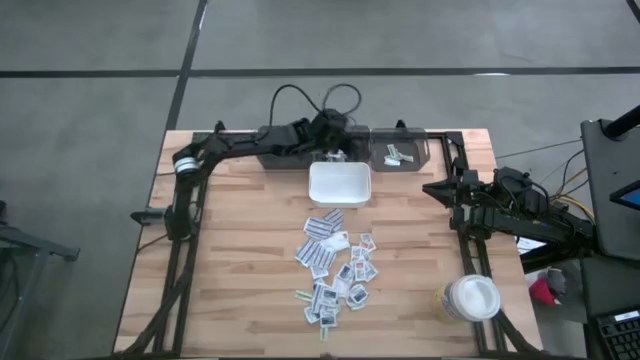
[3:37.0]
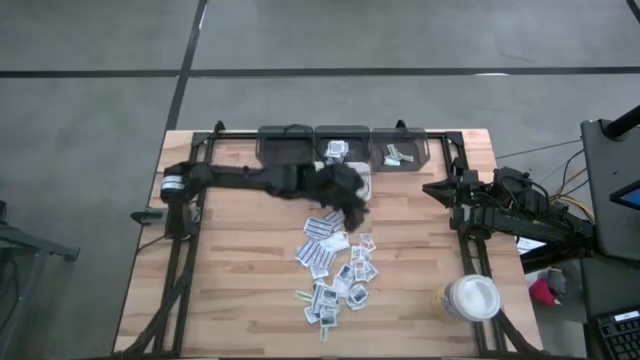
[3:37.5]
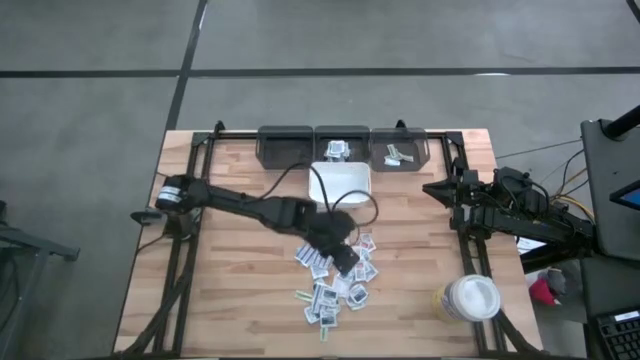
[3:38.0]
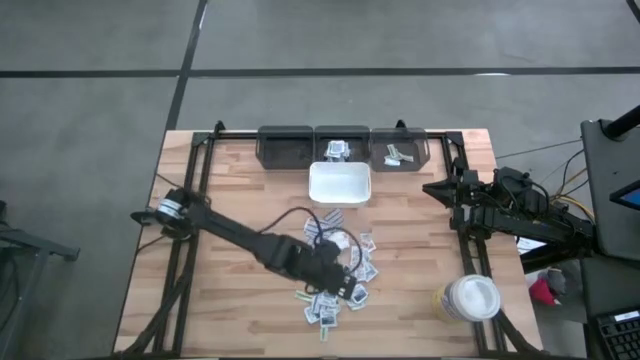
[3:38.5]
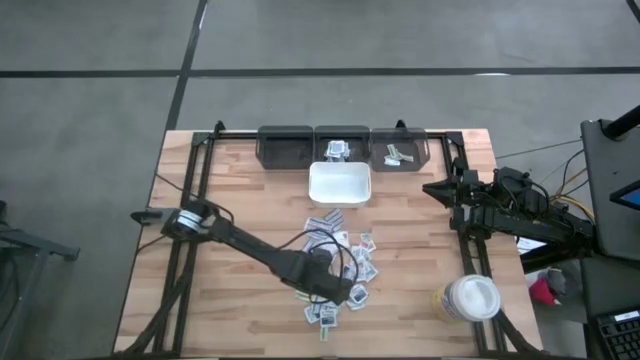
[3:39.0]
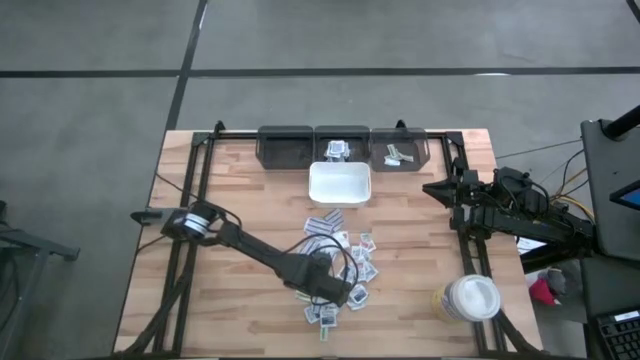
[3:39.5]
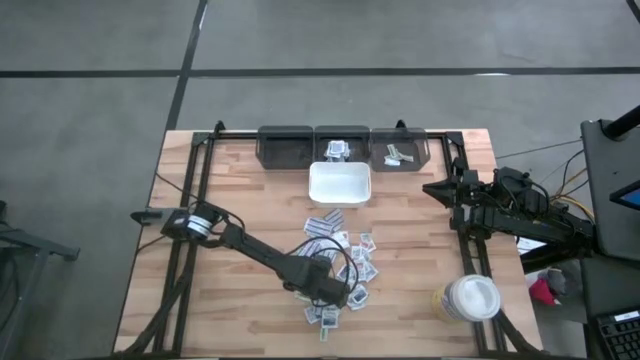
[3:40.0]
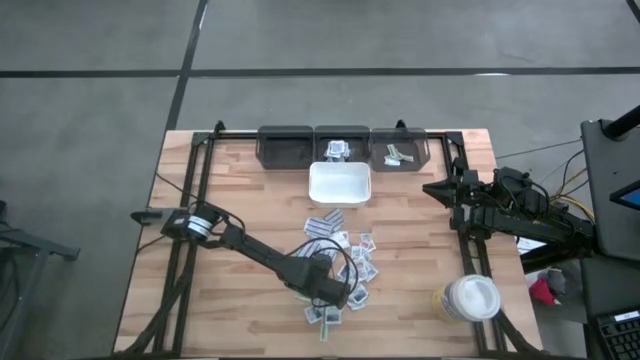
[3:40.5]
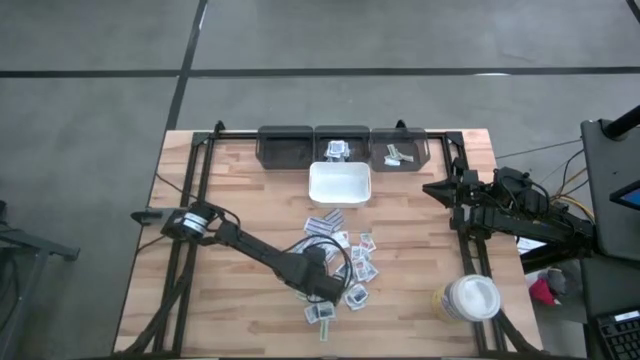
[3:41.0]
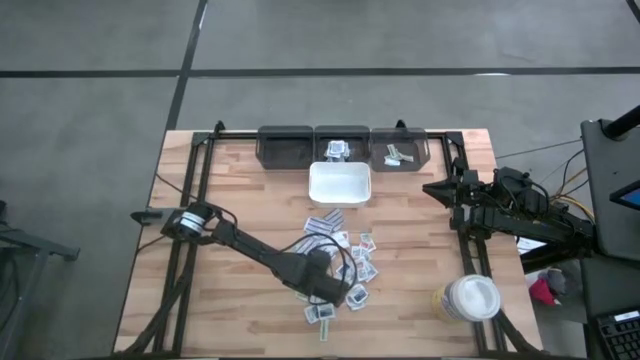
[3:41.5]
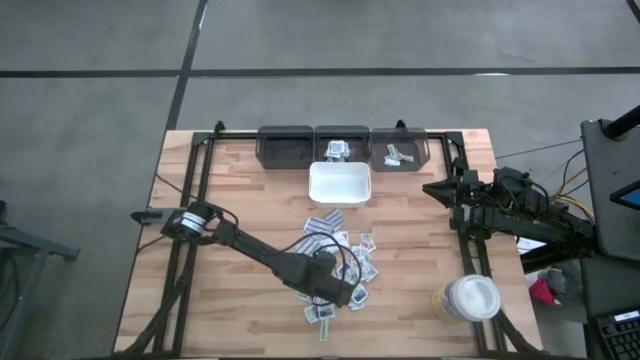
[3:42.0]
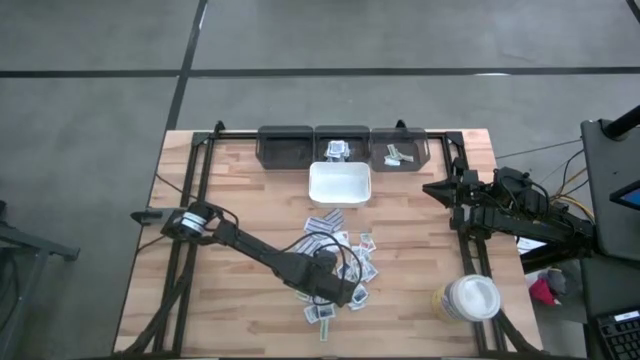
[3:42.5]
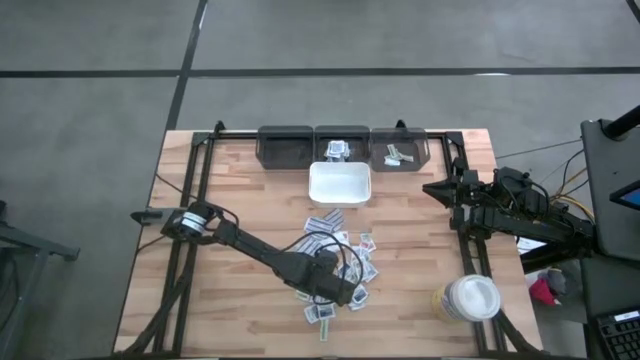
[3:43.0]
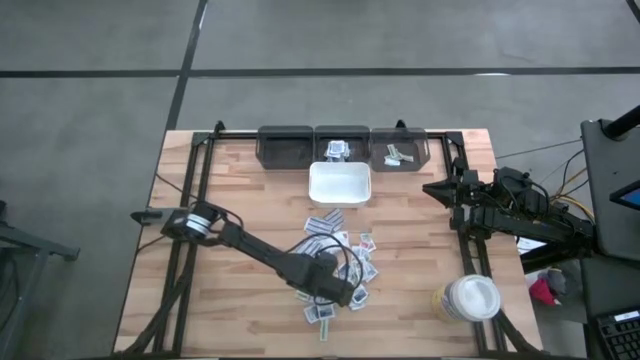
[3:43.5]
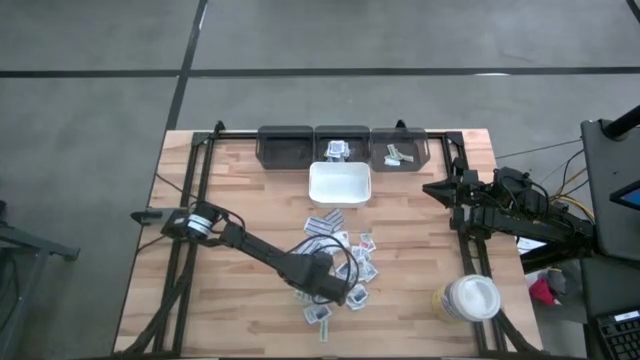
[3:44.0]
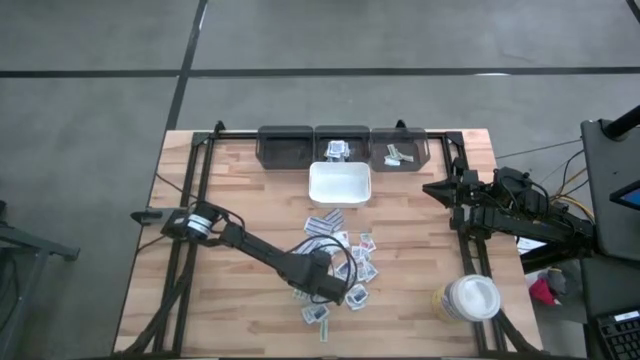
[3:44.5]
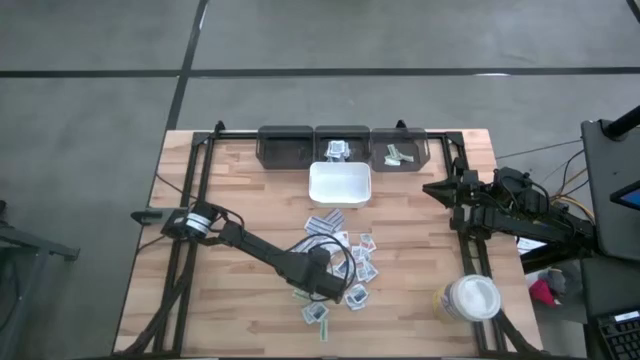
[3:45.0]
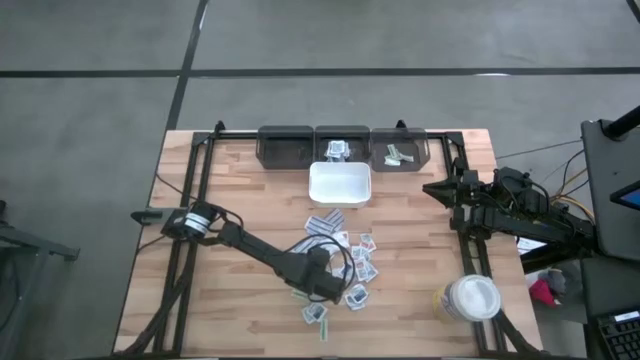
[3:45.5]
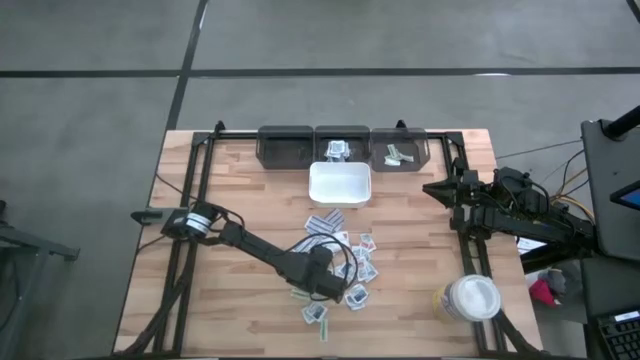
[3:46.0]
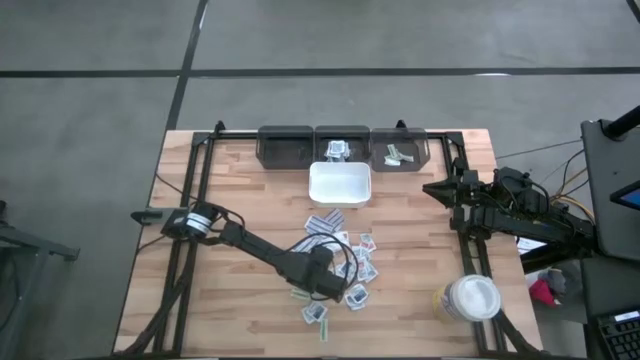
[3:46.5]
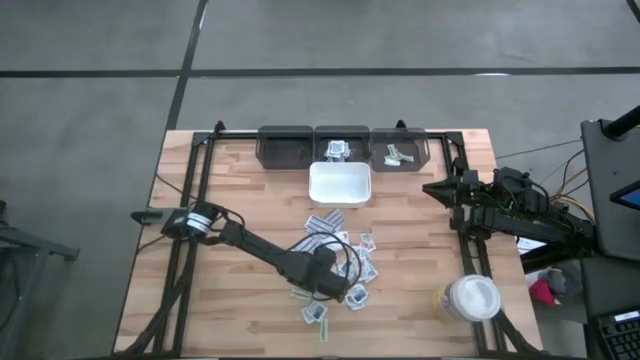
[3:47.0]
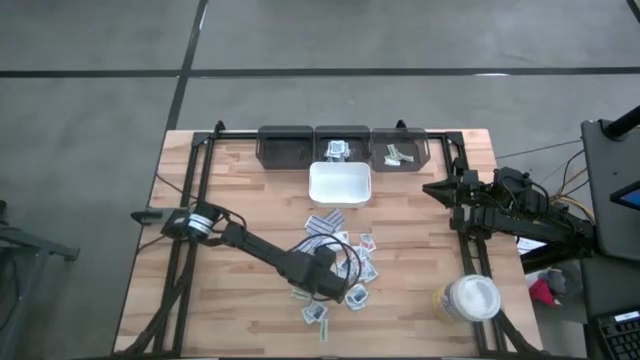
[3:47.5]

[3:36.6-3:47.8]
Task: Pick & Place First Aid Supplies
Put the blue alcohol pad into the middle gray bin

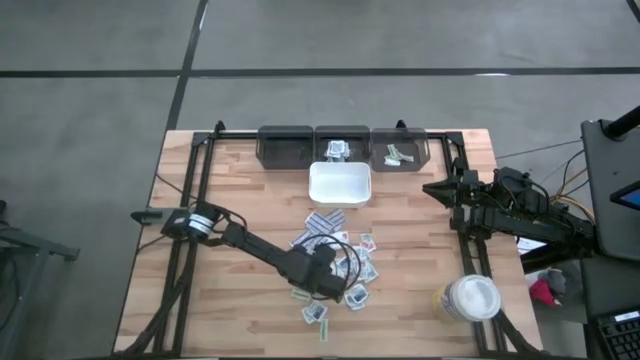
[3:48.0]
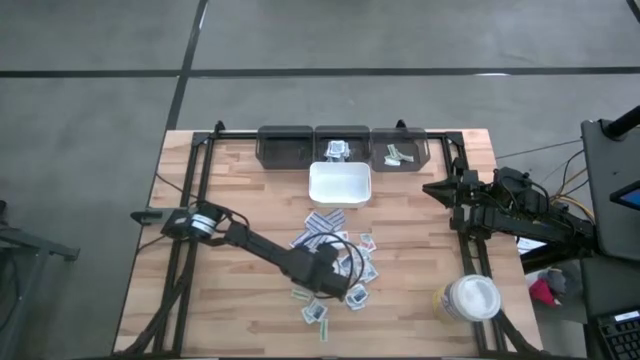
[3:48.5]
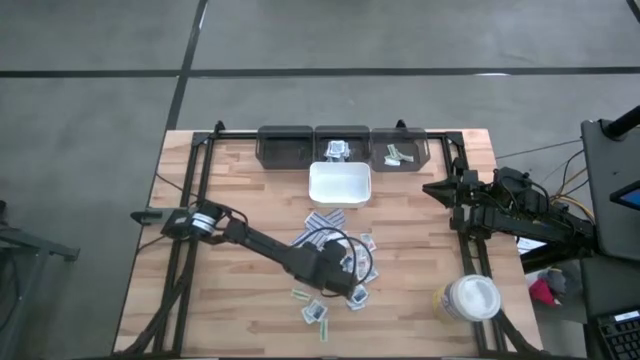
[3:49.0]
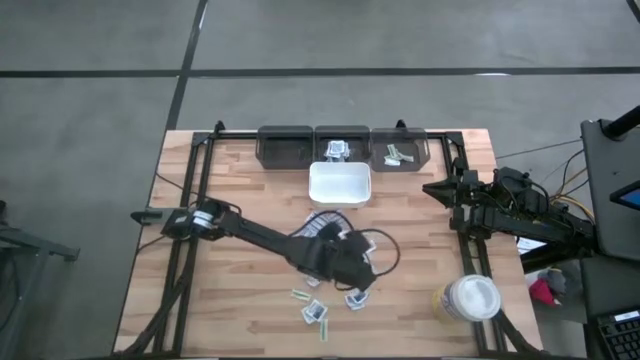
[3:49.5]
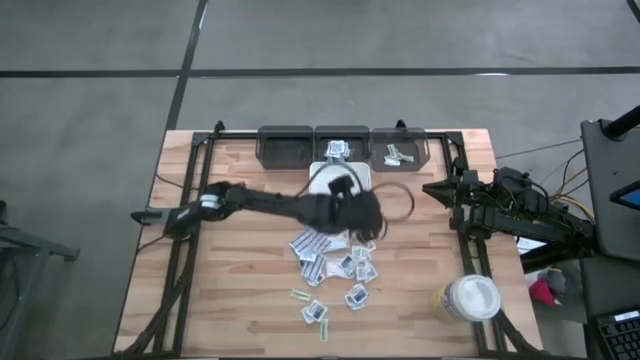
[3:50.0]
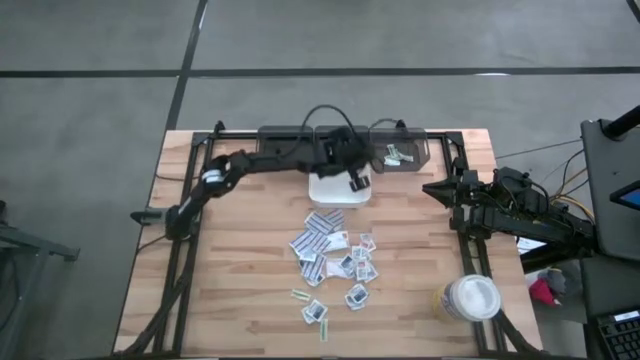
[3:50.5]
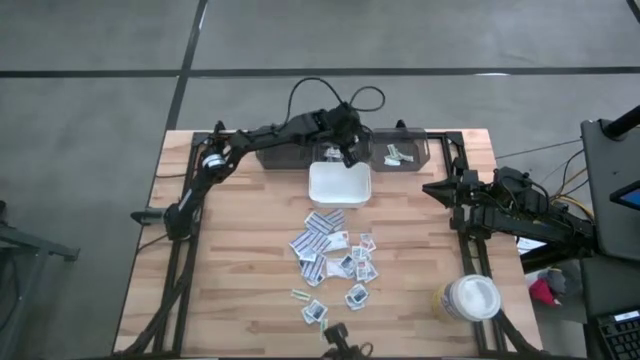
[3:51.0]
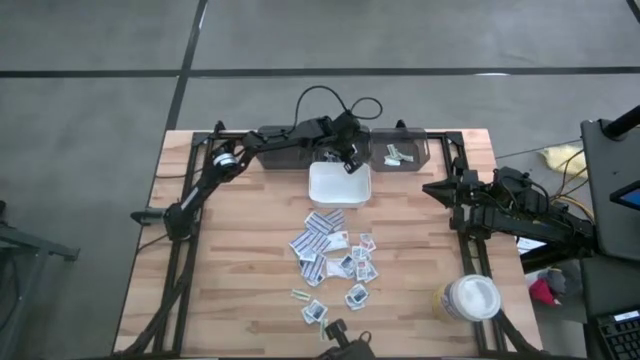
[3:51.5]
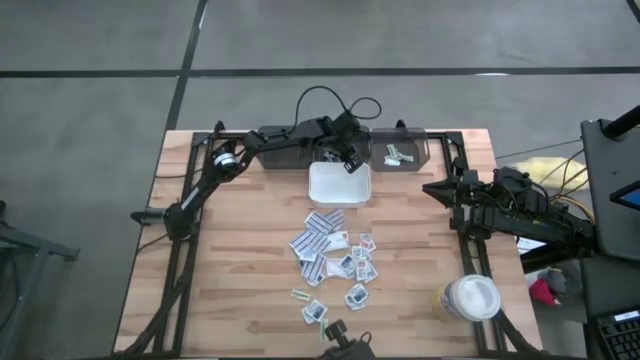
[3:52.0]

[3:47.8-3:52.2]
Put the blue alcohol pad into the middle gray bin

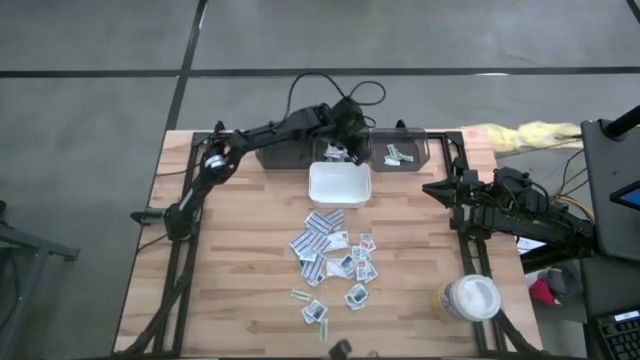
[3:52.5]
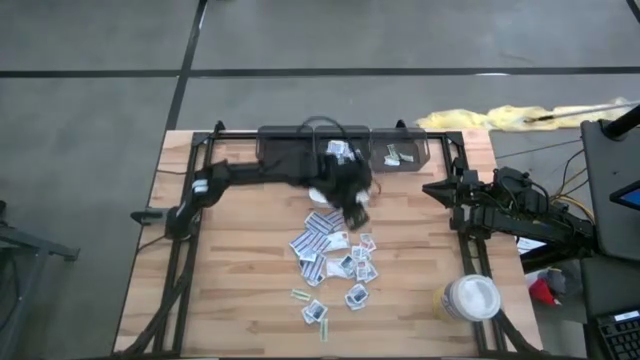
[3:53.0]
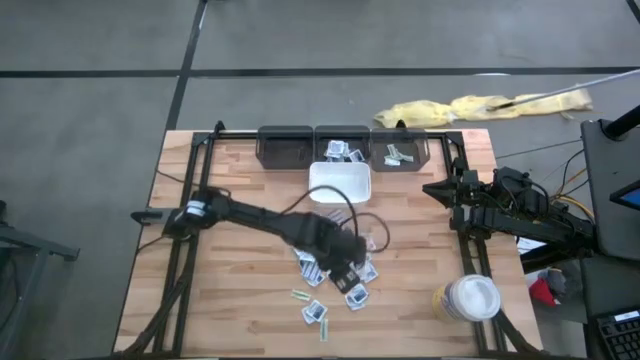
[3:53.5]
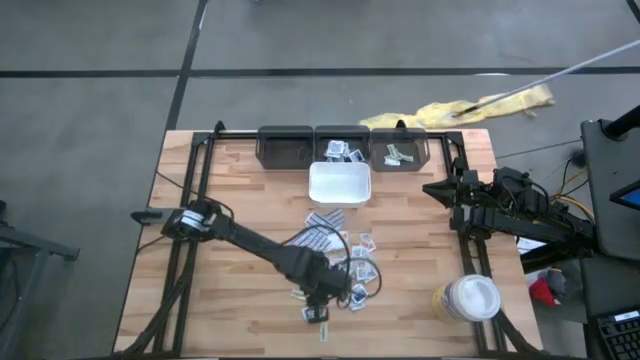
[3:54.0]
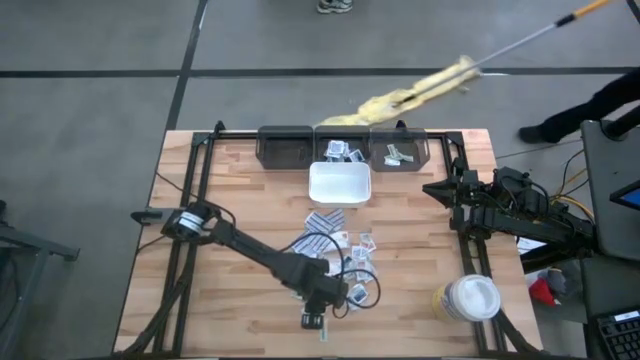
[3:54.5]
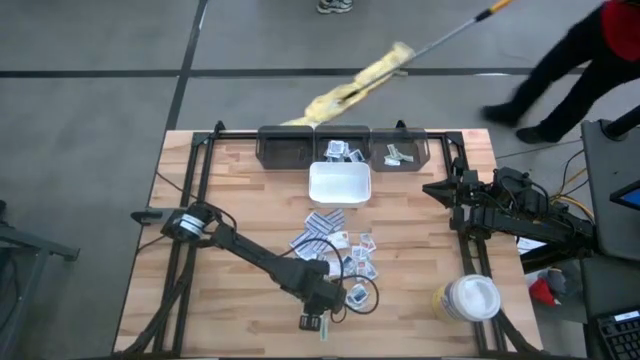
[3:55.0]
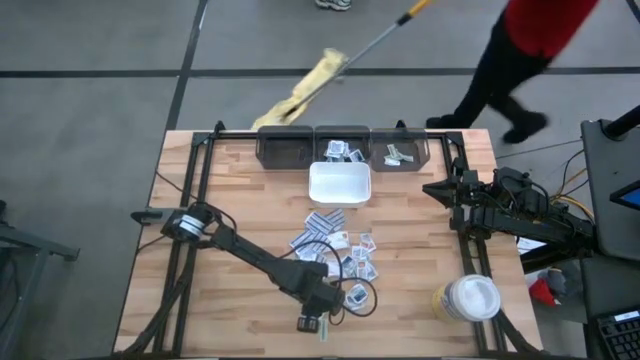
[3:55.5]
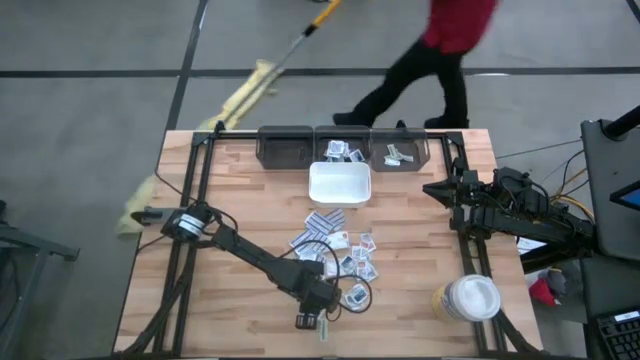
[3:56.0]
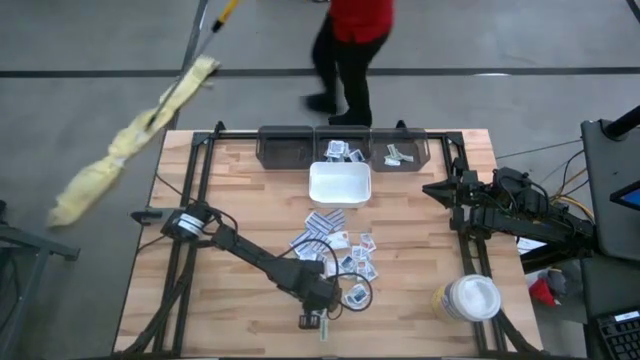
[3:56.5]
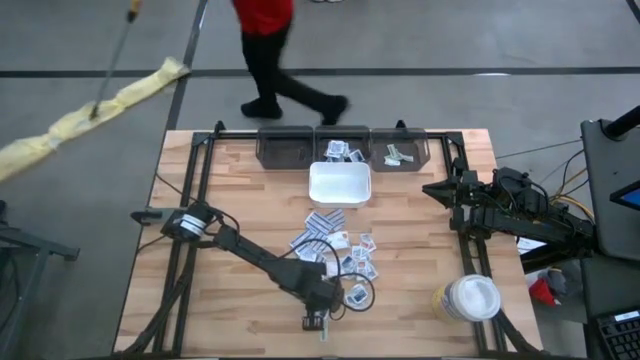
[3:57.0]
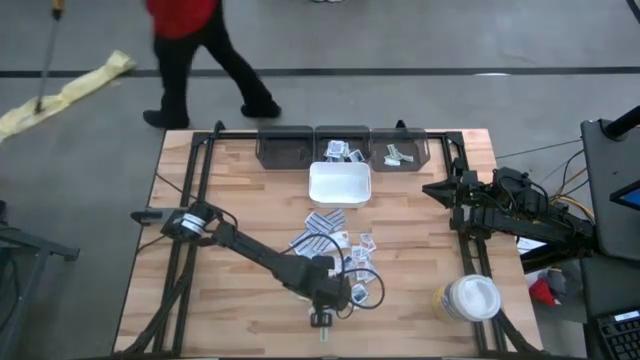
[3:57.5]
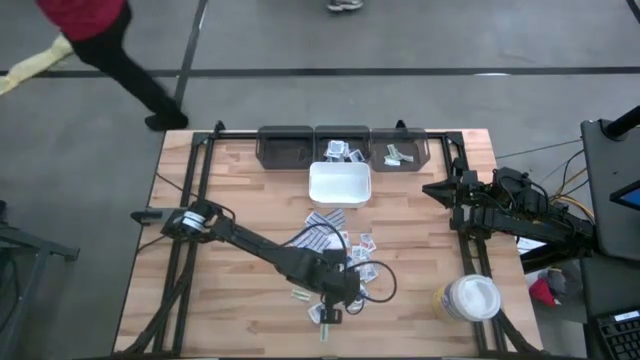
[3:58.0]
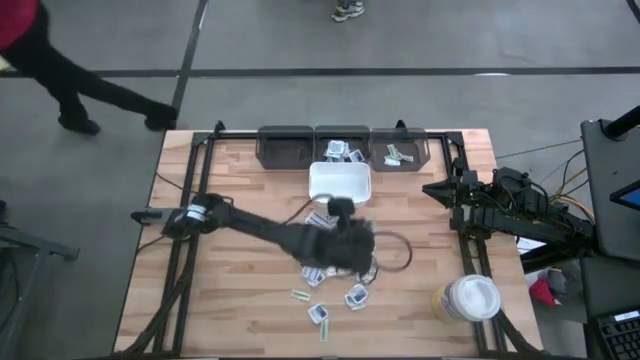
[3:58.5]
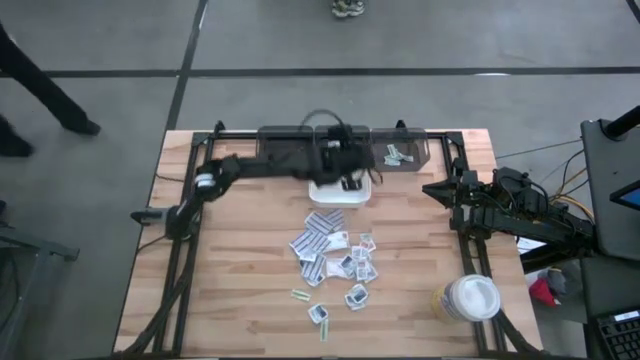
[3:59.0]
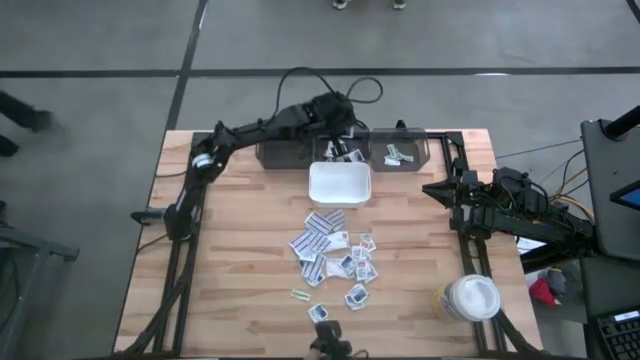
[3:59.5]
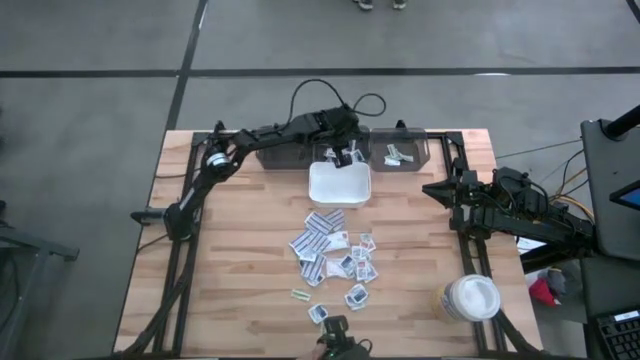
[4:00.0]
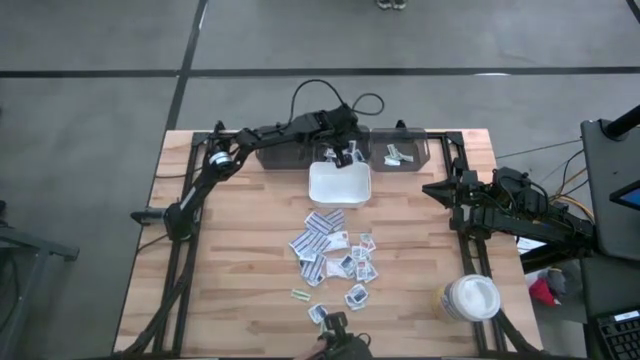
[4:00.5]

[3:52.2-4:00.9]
Put the blue alcohol pad into the middle gray bin
